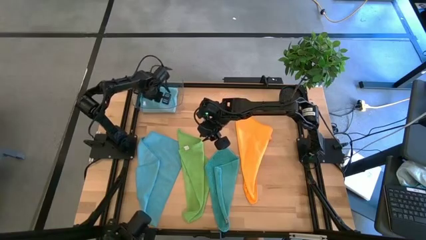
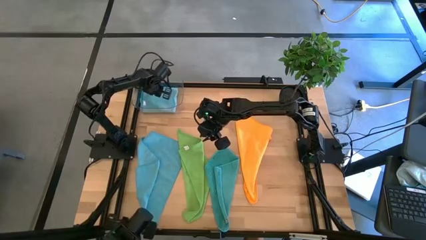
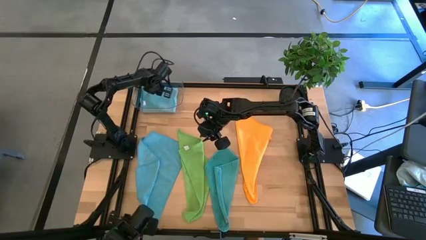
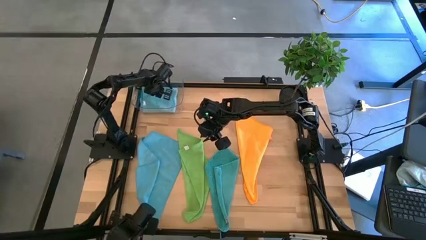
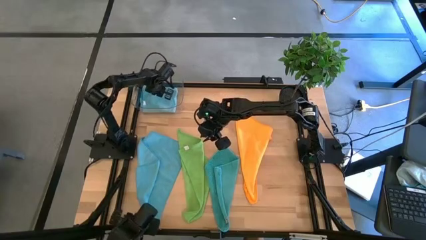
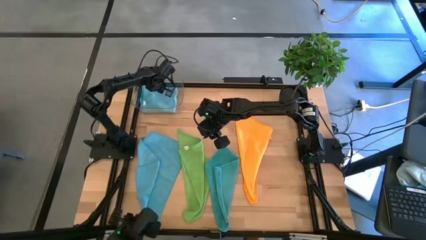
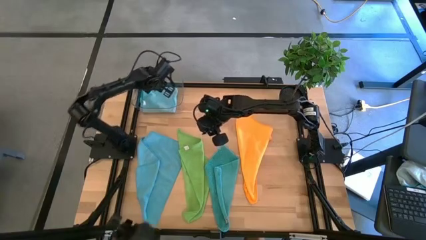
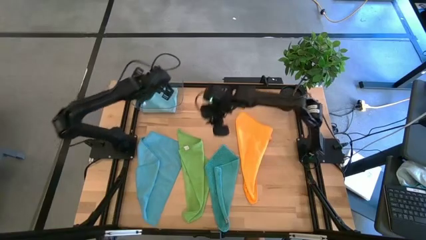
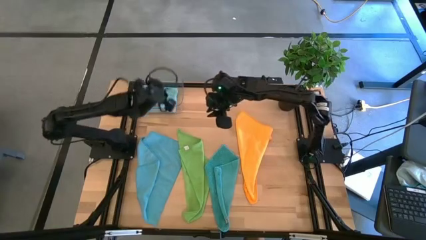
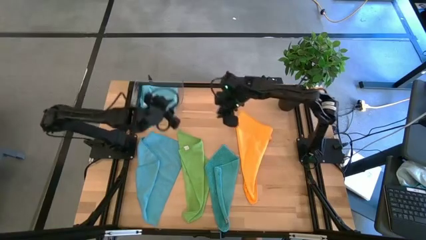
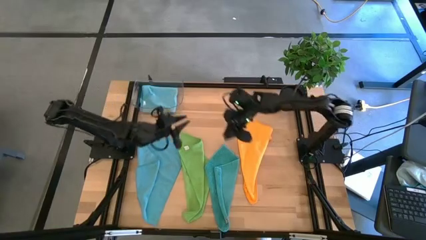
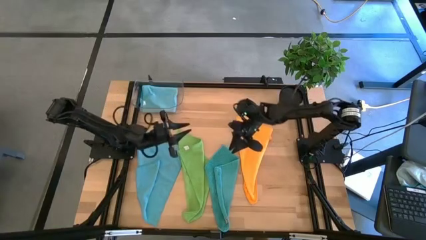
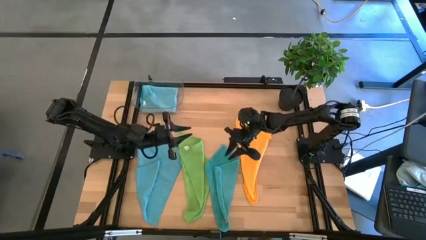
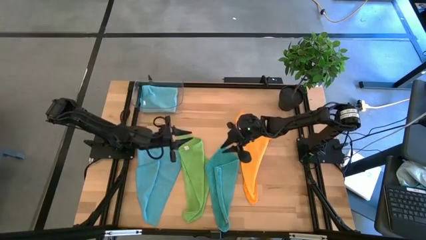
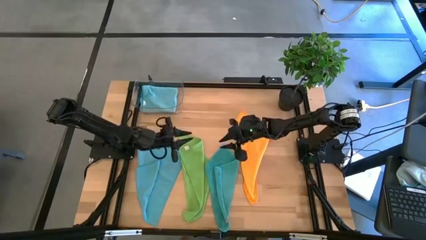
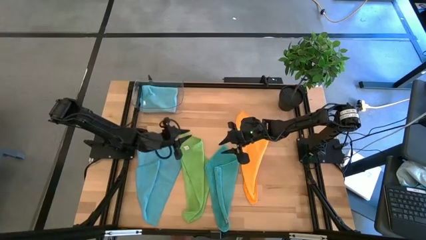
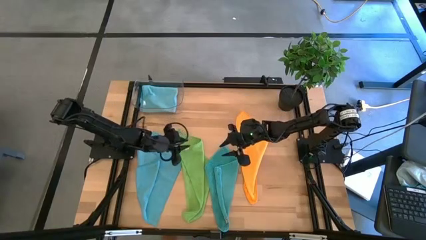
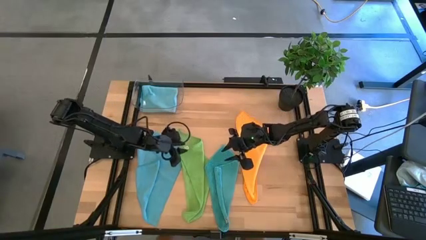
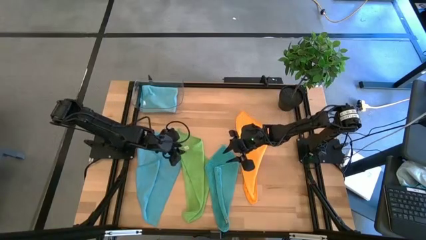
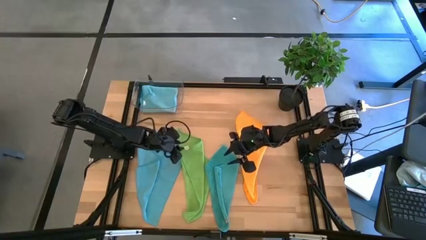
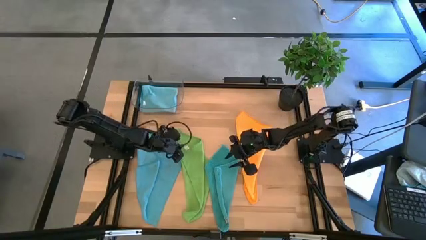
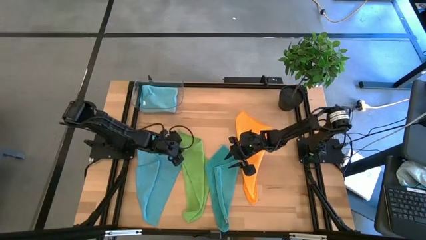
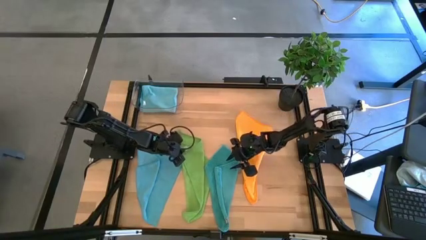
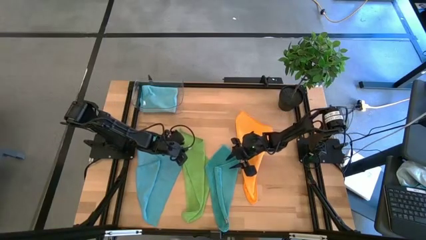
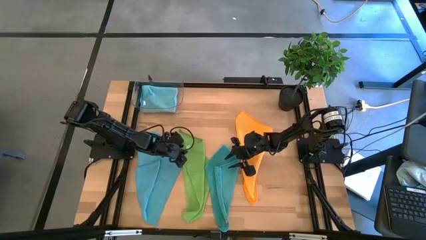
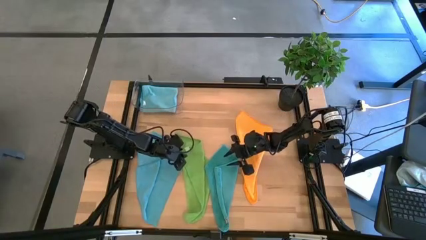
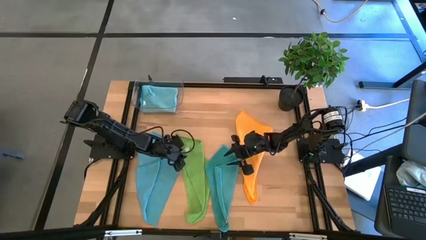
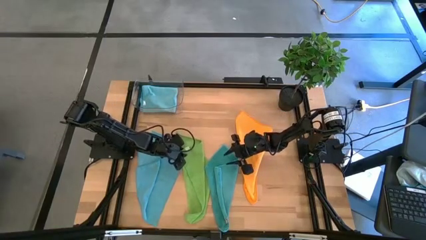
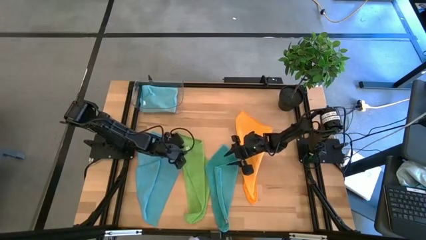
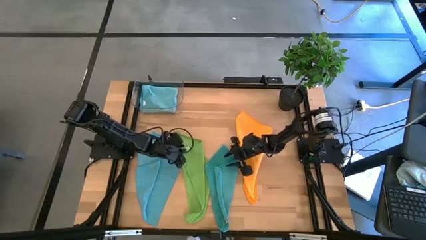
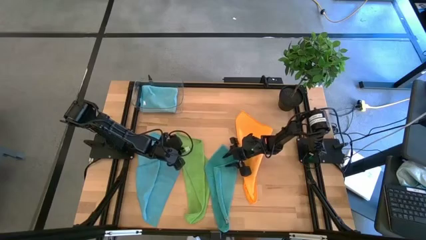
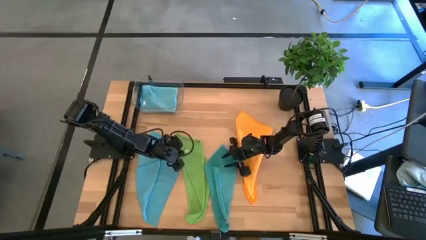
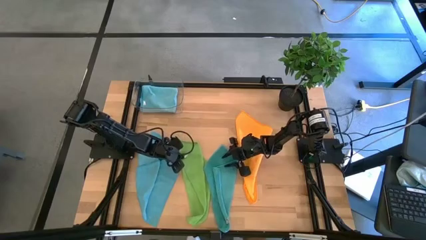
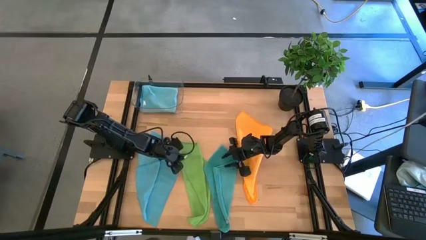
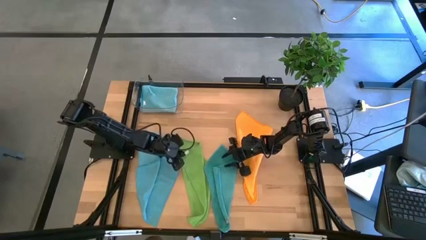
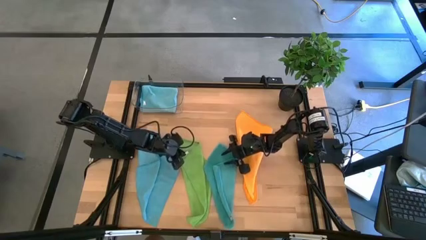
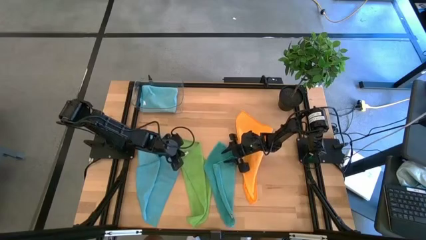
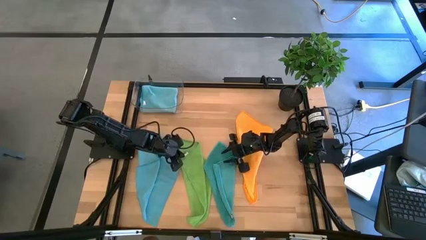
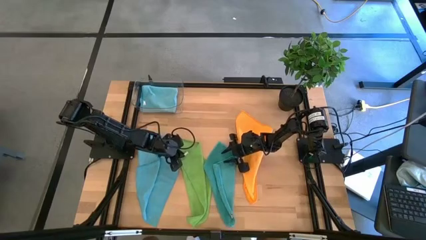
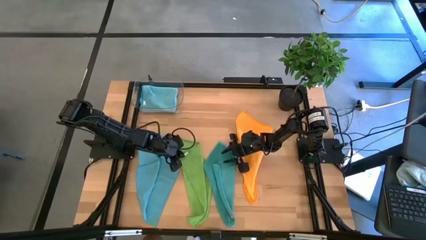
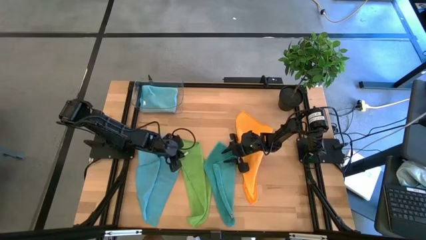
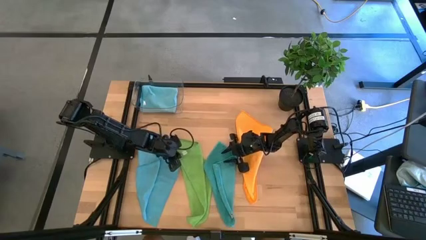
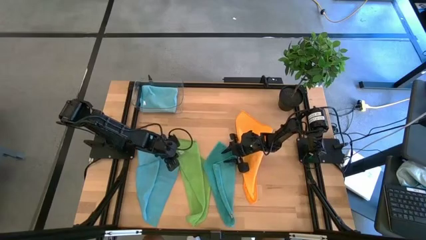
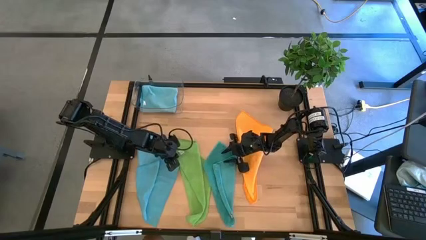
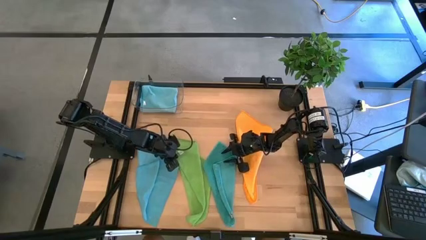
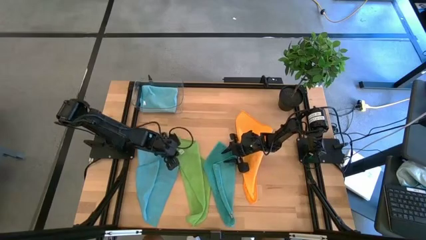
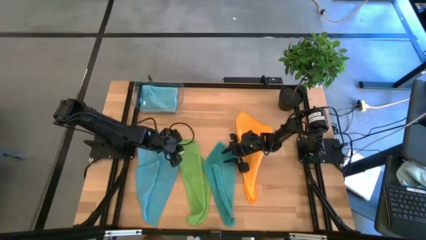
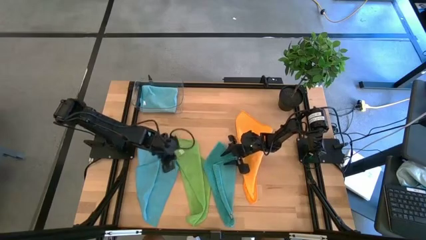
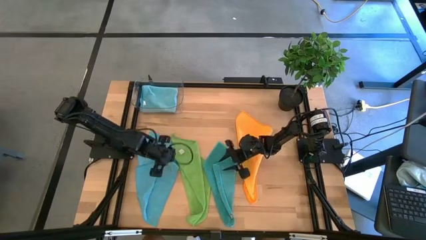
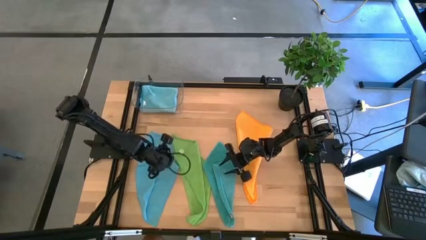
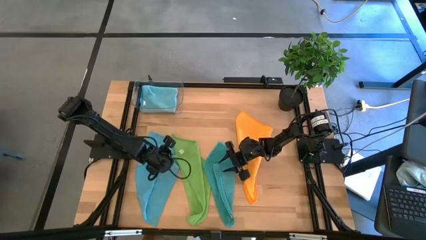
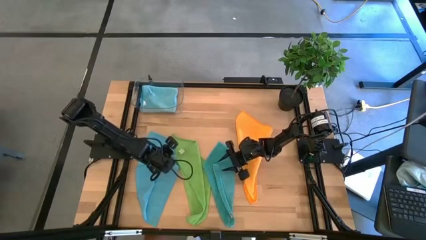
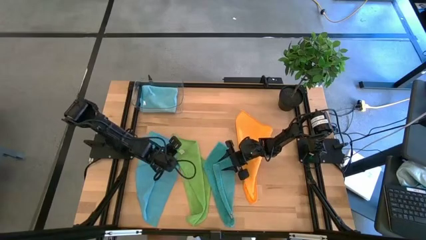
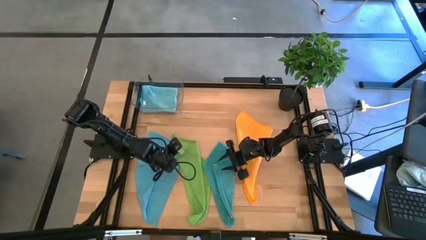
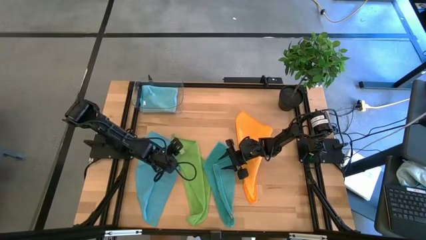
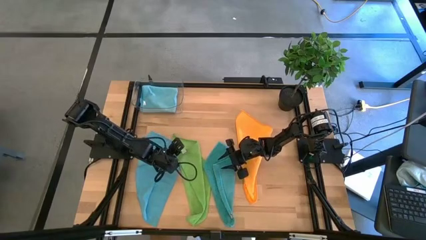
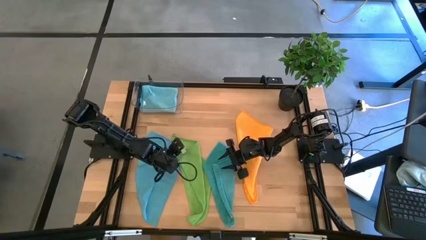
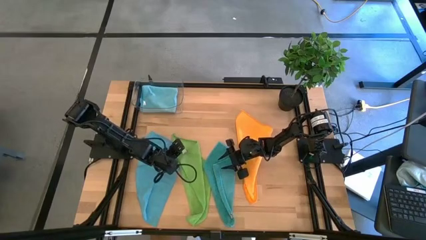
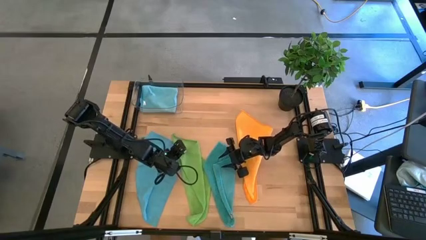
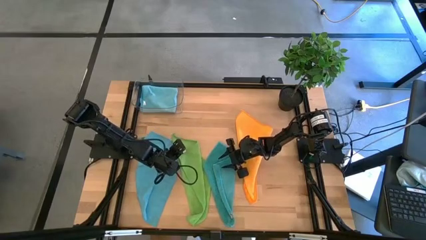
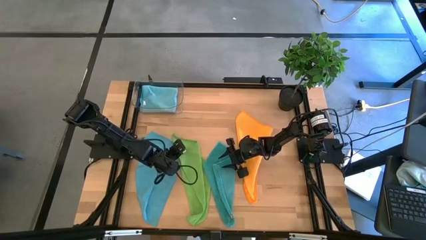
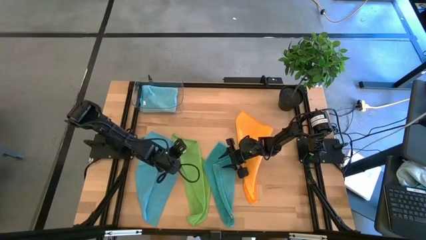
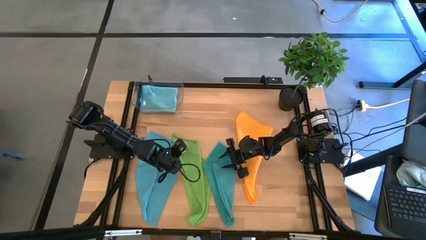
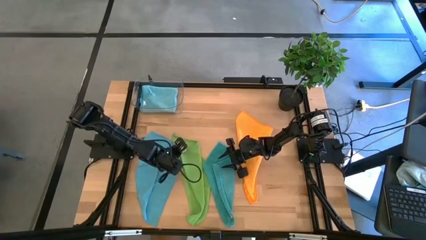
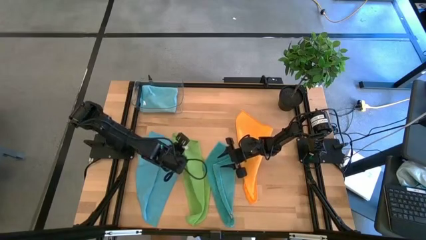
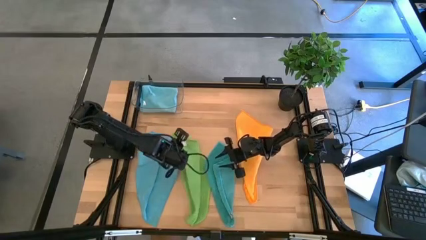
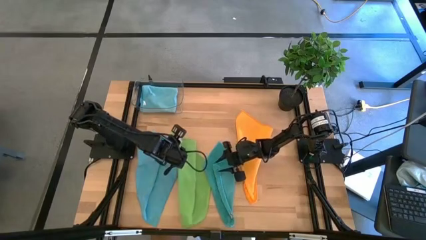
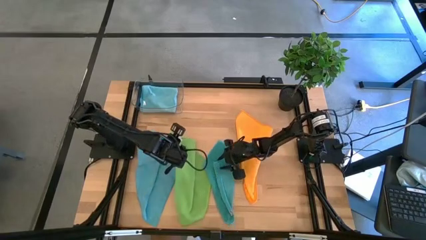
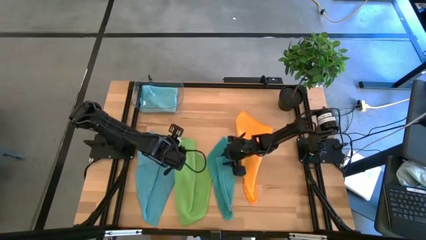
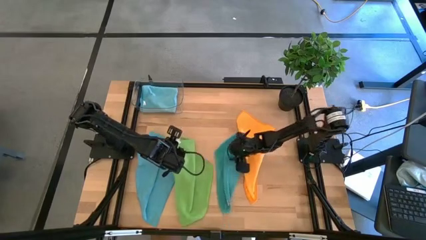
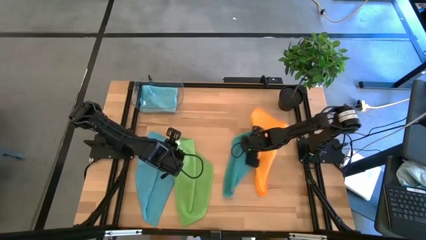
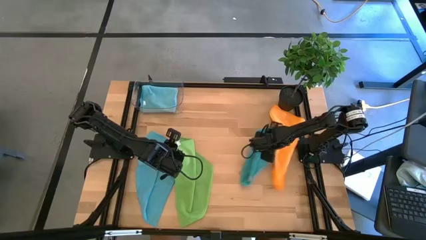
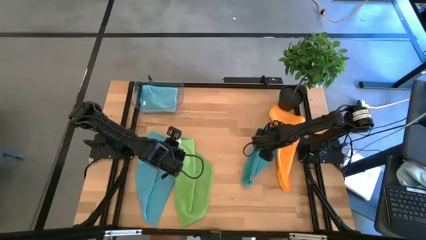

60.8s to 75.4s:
Task: Fold microfiber towels
Fold the green microfiber cloth
